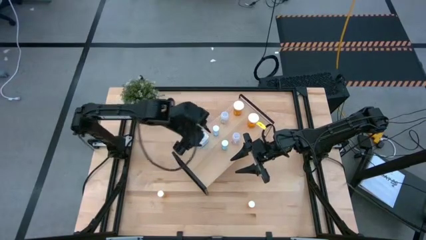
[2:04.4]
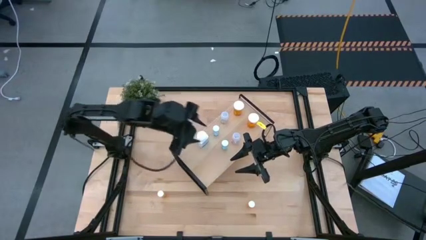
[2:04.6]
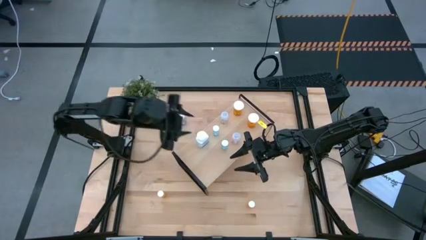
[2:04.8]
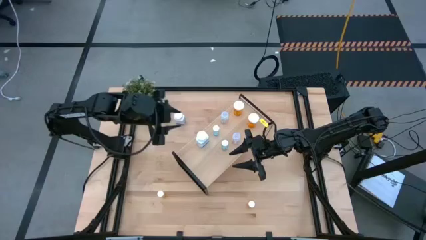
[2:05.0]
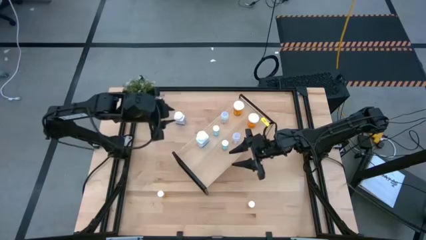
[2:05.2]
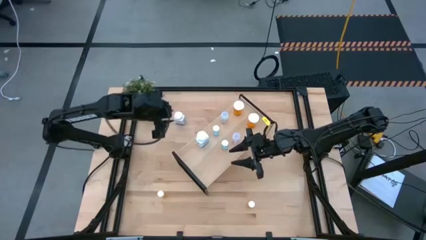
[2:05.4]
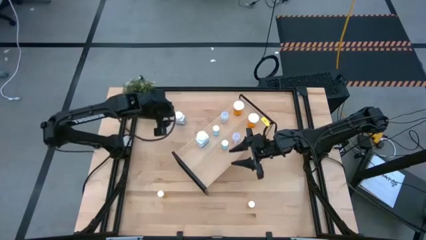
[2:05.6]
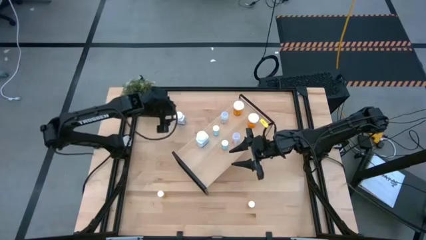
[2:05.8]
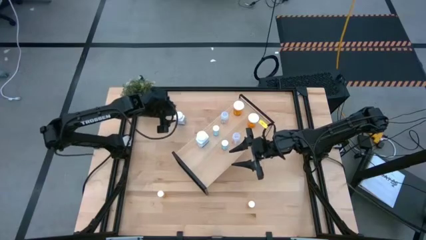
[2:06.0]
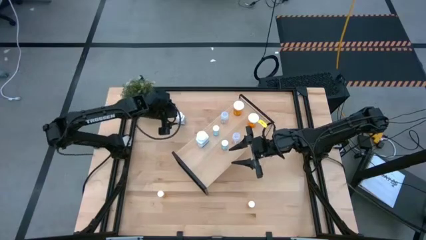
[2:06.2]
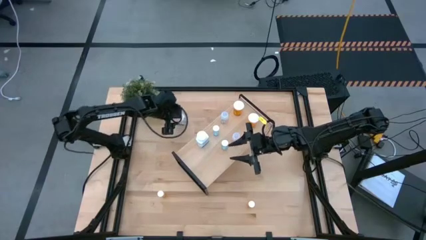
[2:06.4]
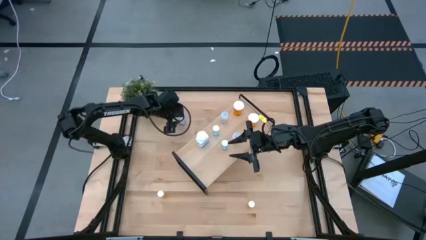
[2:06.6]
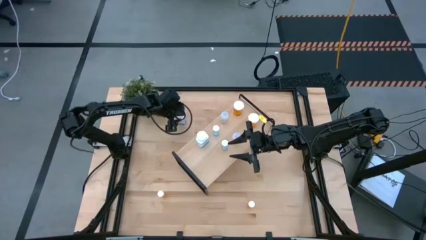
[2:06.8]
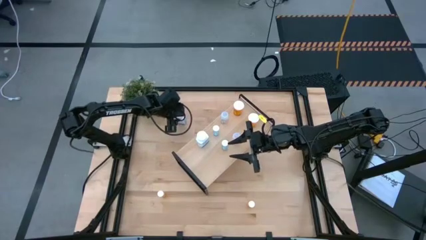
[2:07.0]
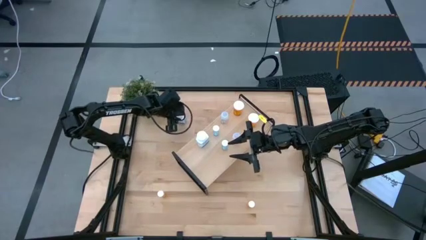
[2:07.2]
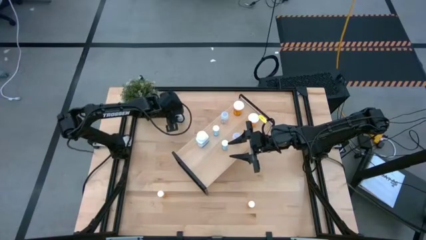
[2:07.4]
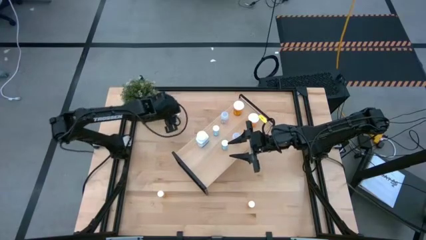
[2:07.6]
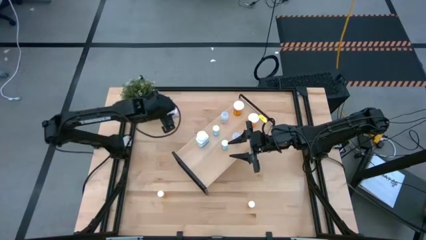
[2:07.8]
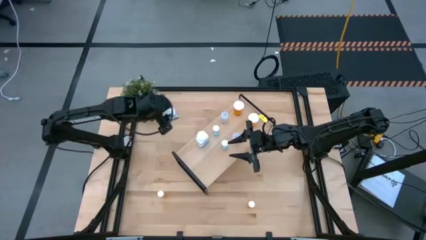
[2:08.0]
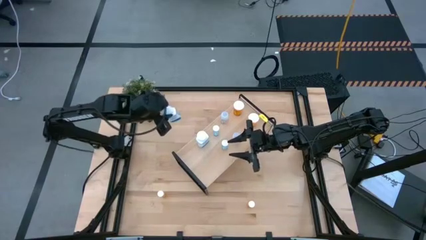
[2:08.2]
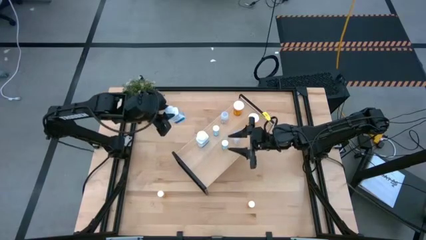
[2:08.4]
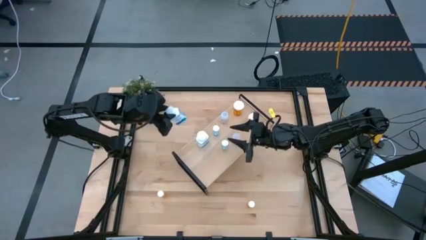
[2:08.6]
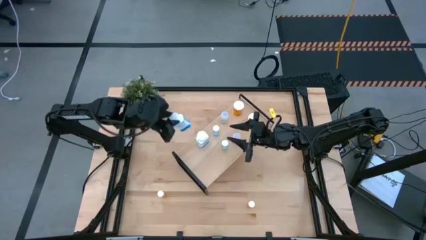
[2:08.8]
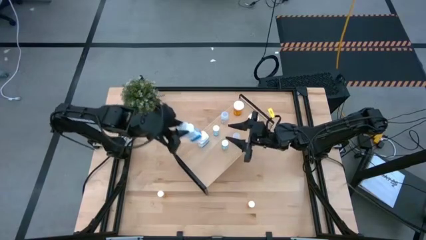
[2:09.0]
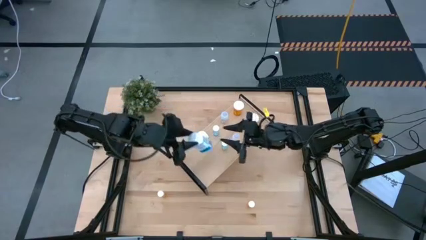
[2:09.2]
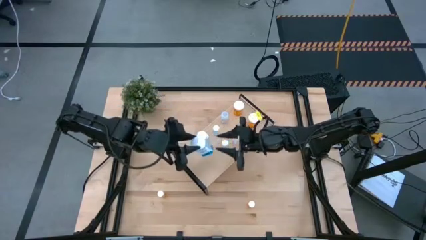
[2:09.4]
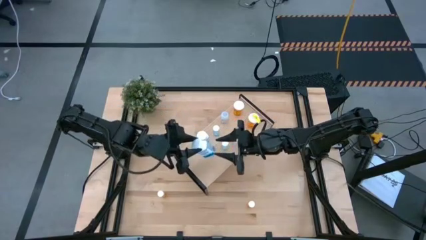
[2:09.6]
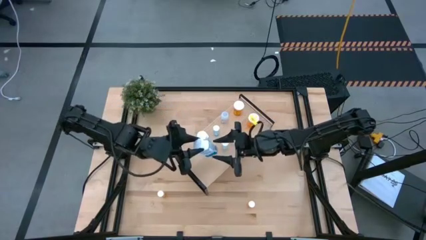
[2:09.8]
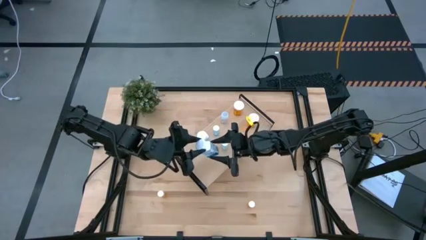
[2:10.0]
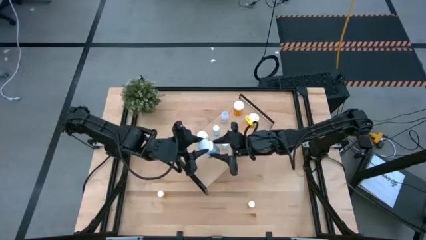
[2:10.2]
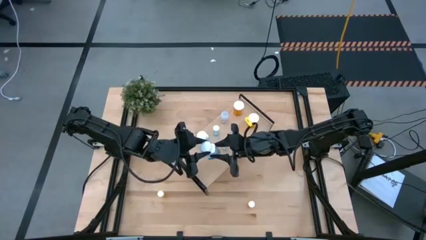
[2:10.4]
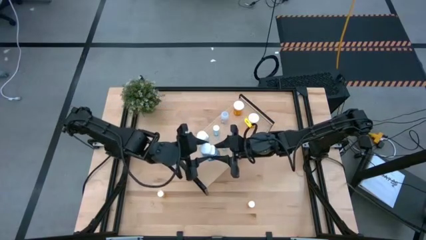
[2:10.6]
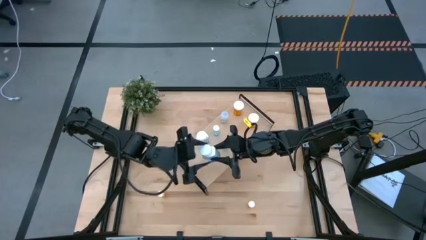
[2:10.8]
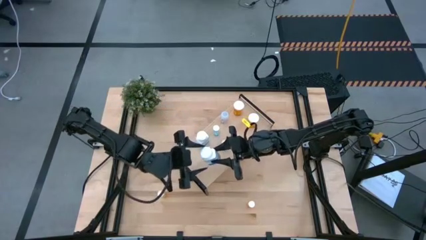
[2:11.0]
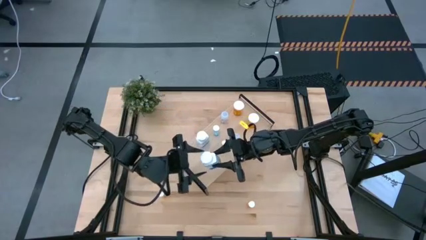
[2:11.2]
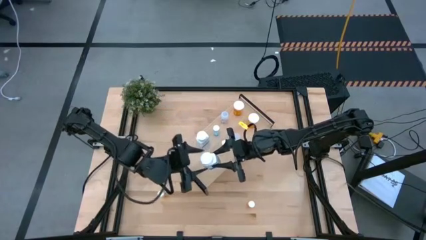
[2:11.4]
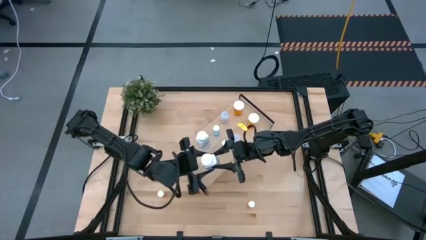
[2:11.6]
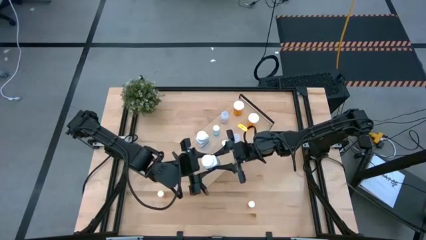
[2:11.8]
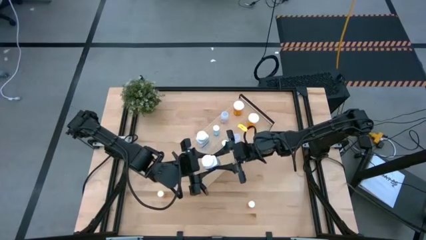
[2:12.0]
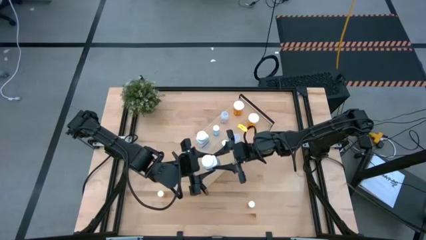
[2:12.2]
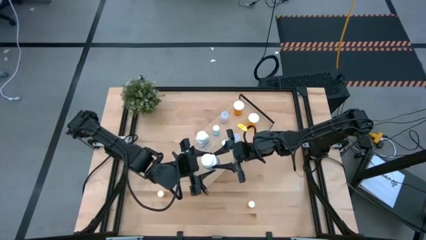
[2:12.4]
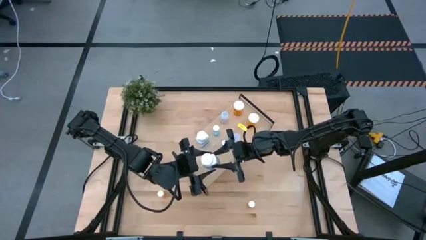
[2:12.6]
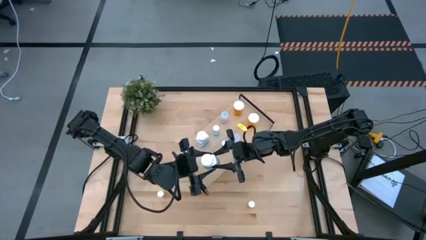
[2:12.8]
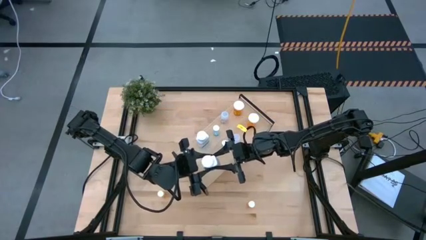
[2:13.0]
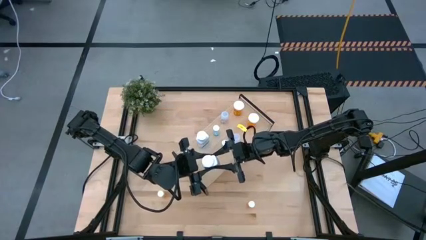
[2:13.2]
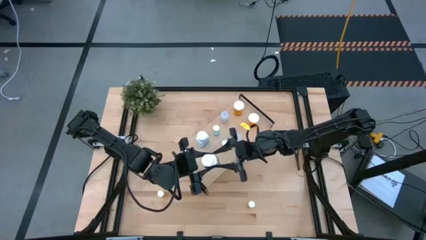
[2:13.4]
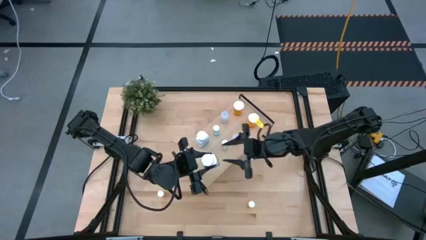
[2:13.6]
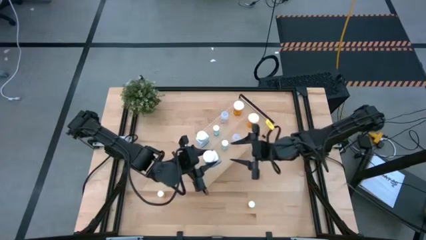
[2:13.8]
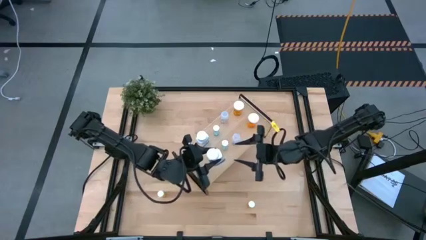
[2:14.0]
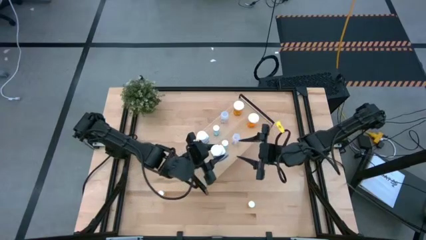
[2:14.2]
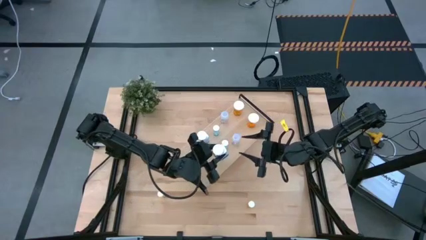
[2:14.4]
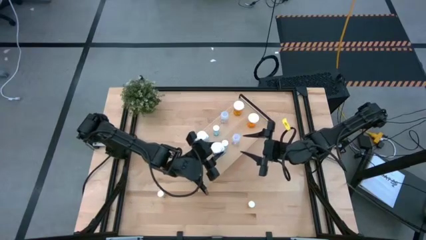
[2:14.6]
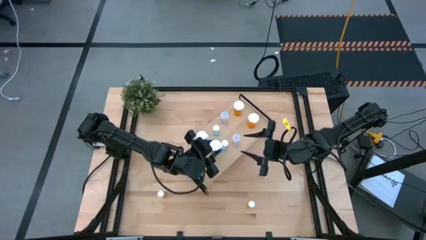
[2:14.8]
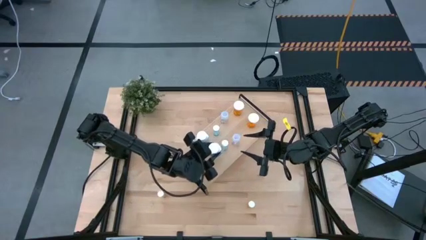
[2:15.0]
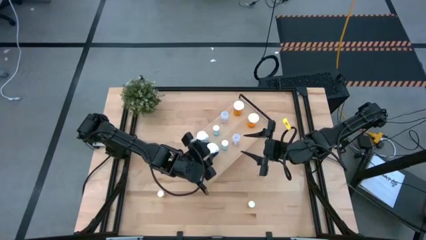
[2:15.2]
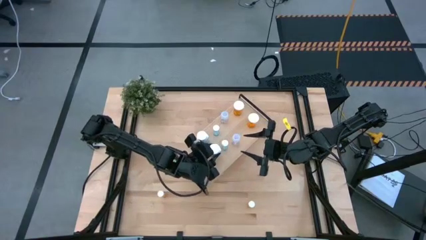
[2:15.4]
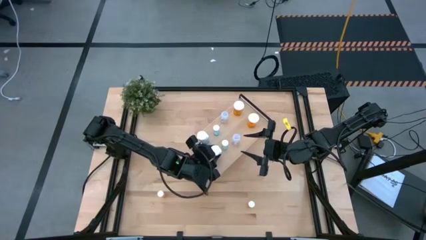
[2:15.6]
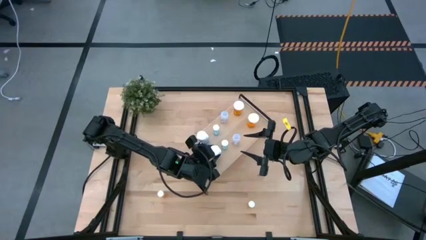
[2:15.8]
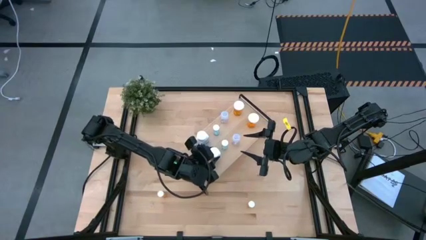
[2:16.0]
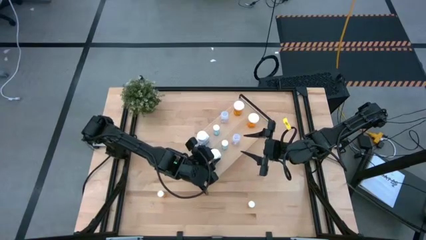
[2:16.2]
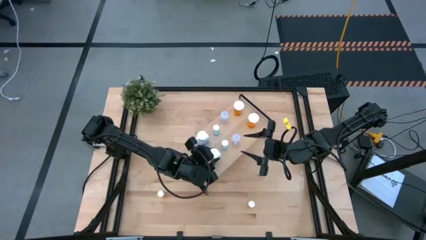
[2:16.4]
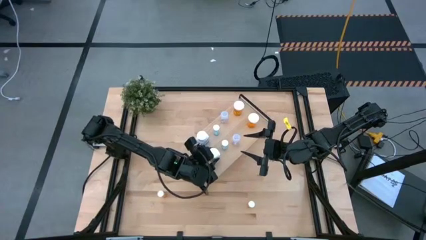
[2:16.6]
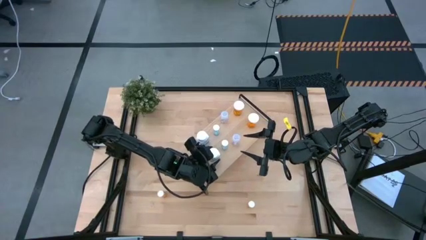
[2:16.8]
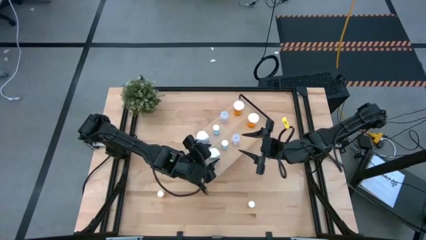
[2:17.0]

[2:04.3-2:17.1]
Task: Pick and place medicine bottles onto shelf by color
Put the white pill bottle on the shelf aligned with the other white pill bottle
